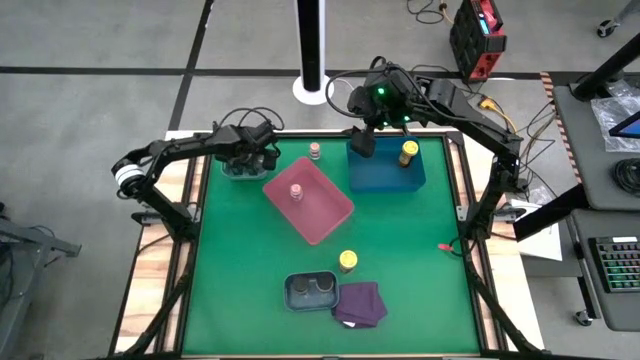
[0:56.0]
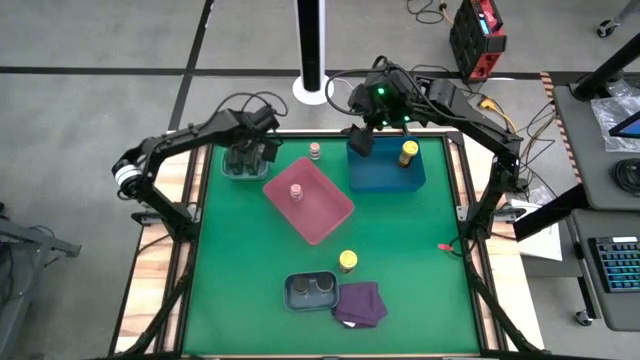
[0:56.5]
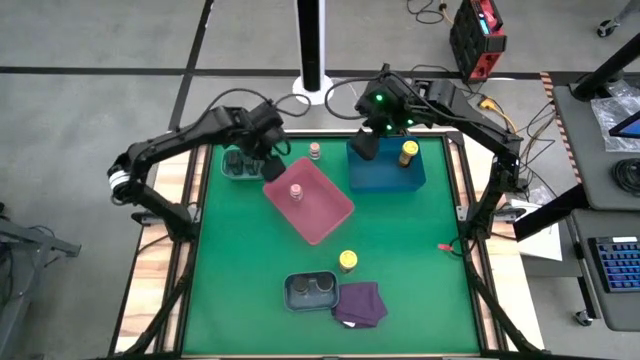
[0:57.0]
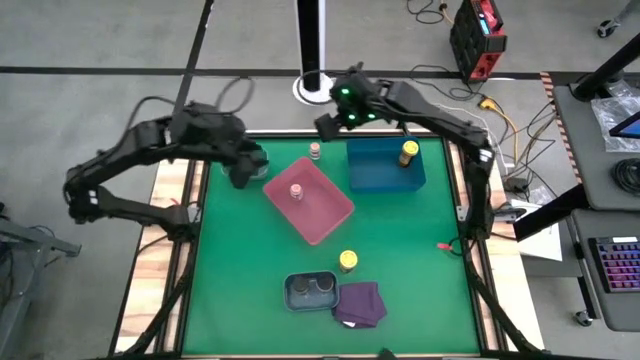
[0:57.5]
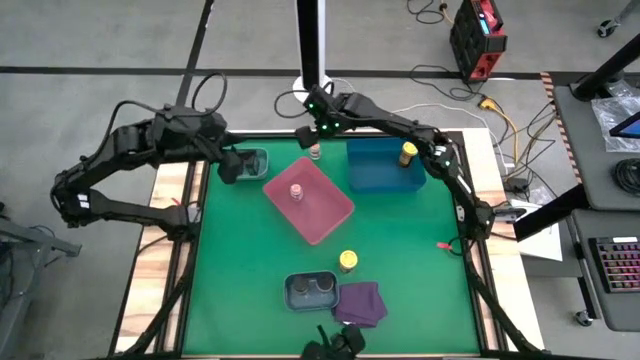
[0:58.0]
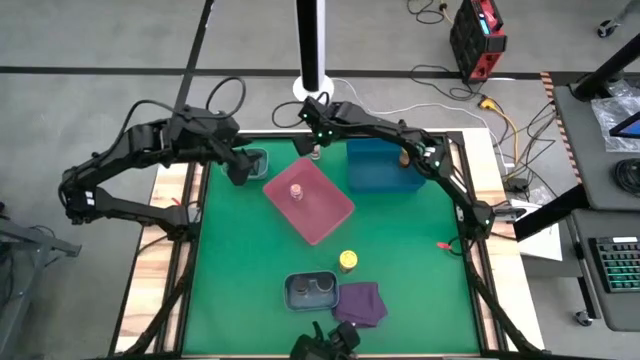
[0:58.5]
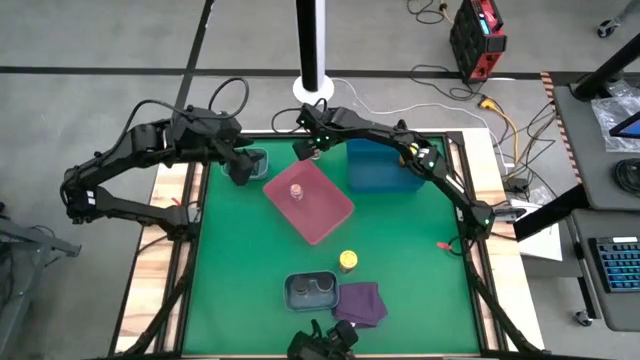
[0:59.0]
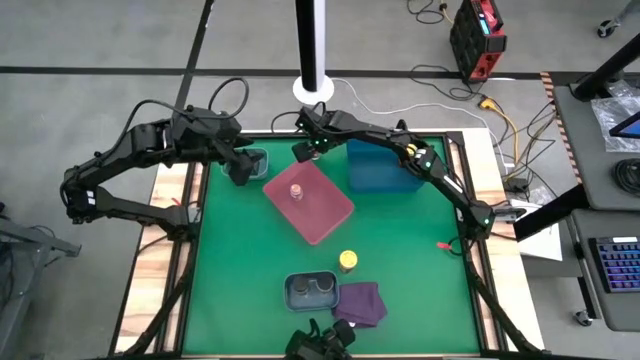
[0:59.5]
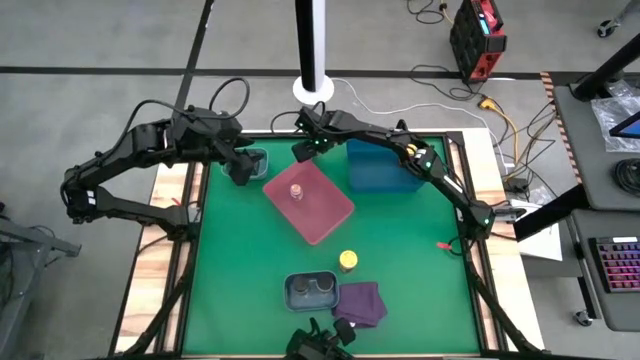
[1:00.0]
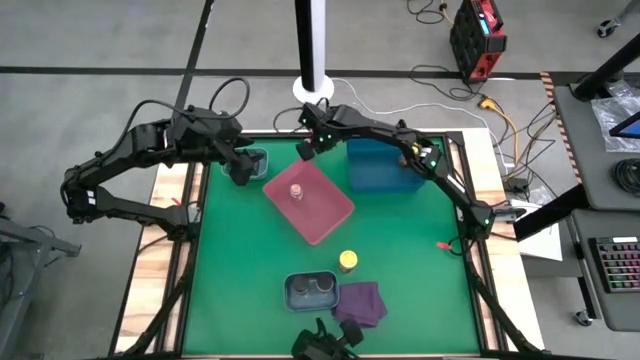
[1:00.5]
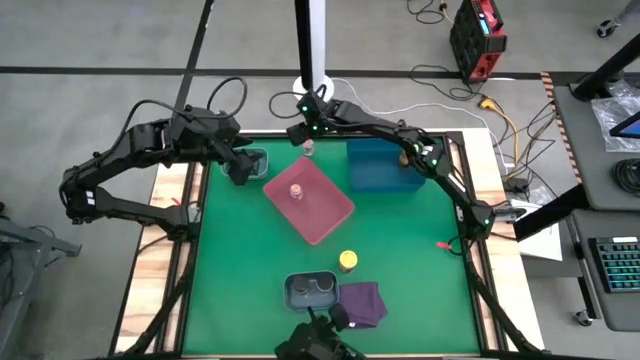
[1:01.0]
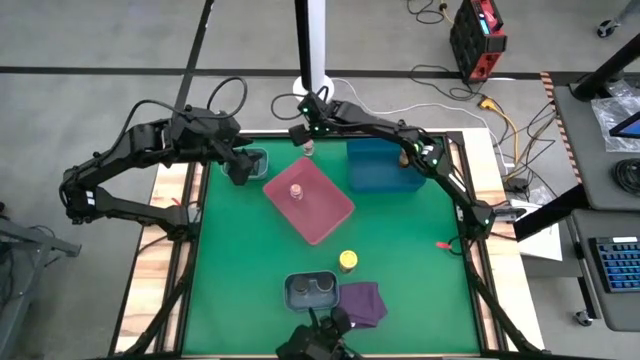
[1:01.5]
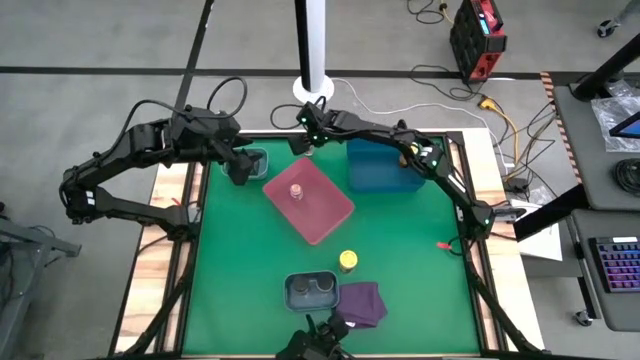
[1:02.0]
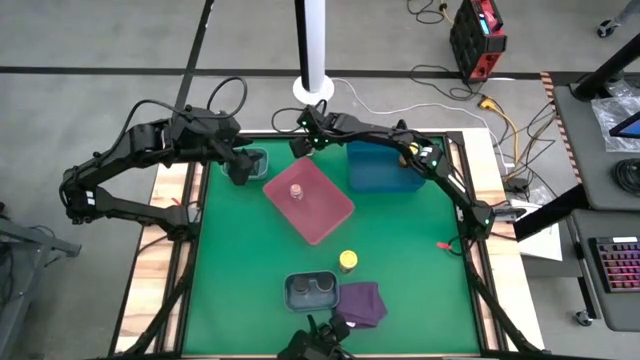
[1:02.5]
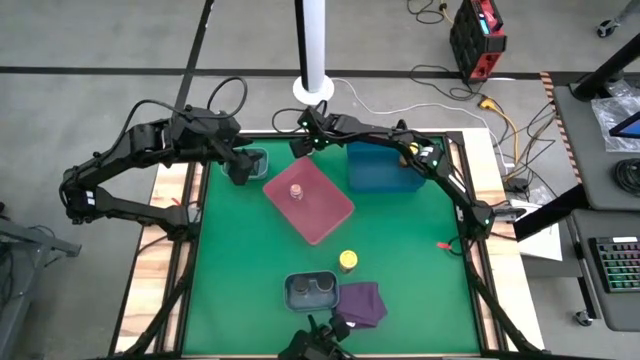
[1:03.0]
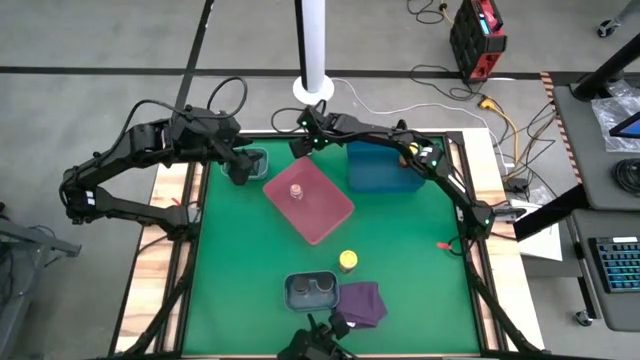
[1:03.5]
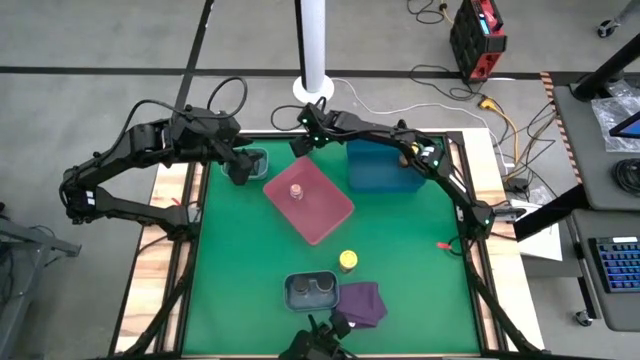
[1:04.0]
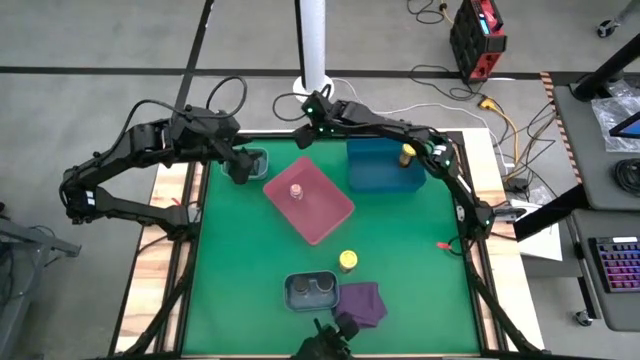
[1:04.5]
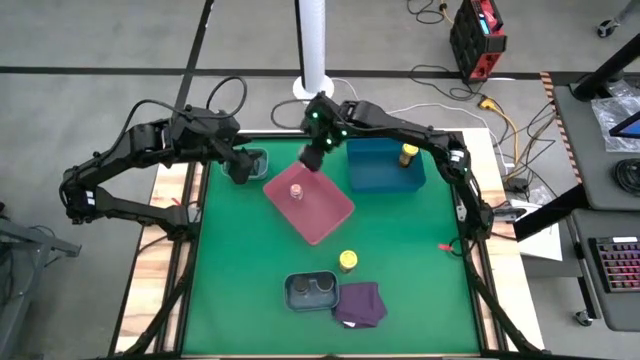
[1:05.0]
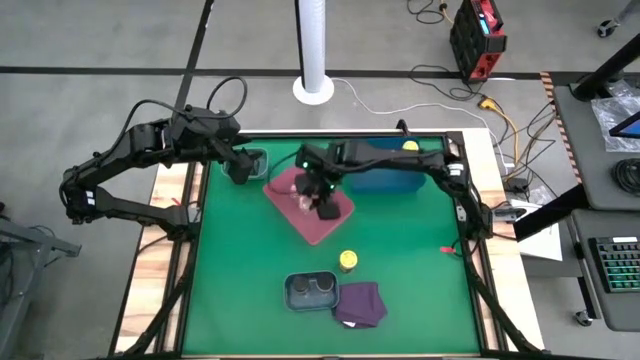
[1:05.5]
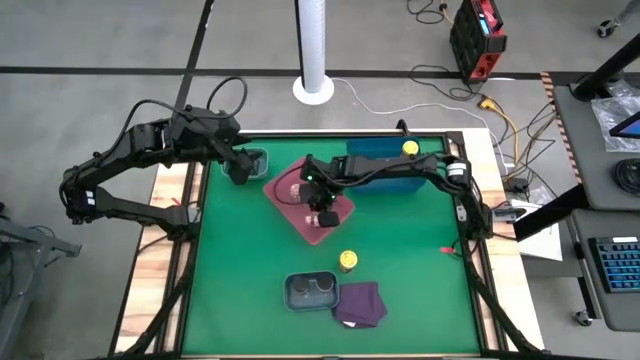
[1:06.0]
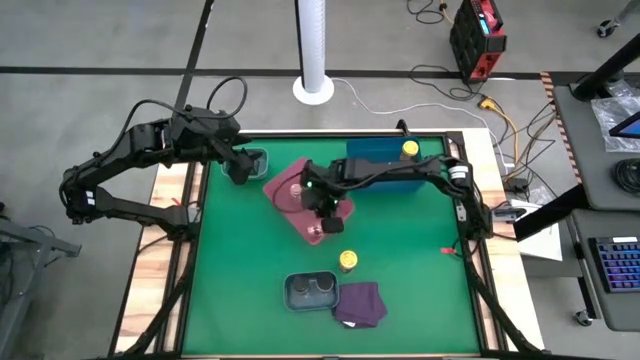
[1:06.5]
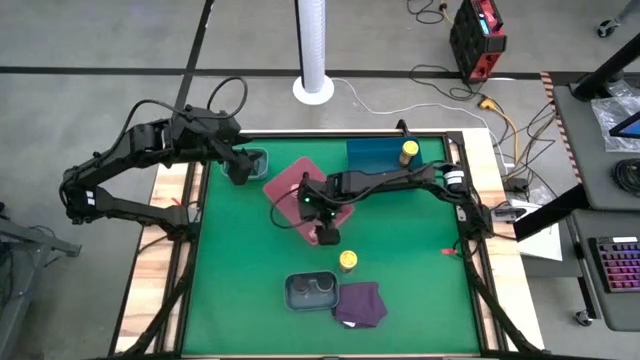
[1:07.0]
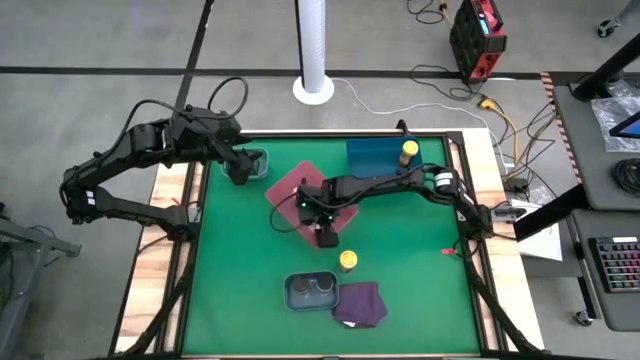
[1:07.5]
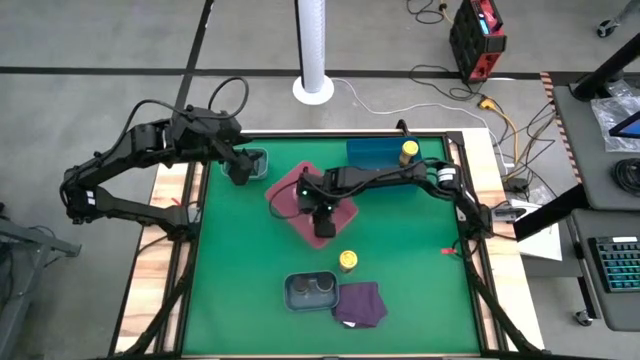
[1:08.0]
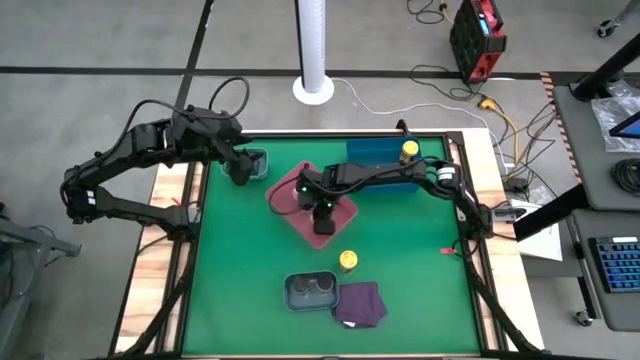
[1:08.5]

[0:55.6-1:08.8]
Task: Sort spices by type
Put the transparent seasoning bottle into the pink bin

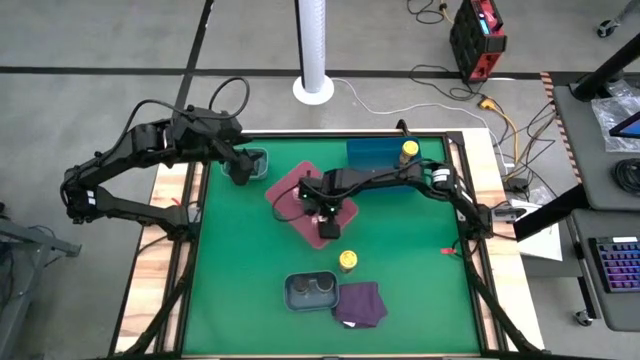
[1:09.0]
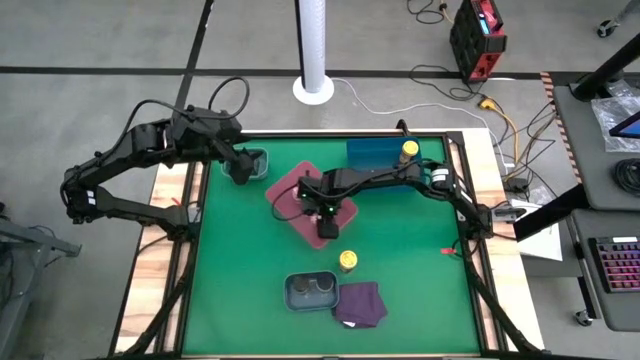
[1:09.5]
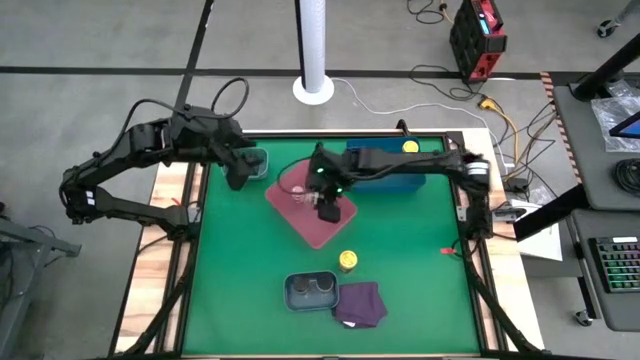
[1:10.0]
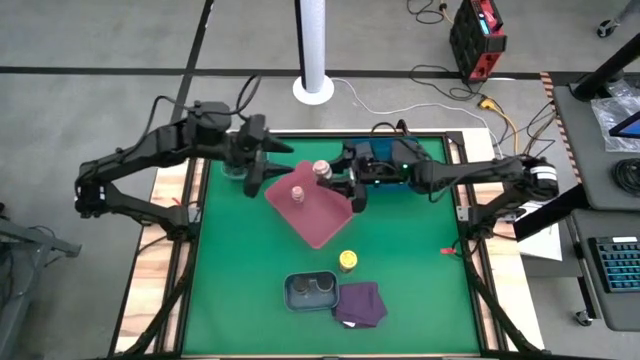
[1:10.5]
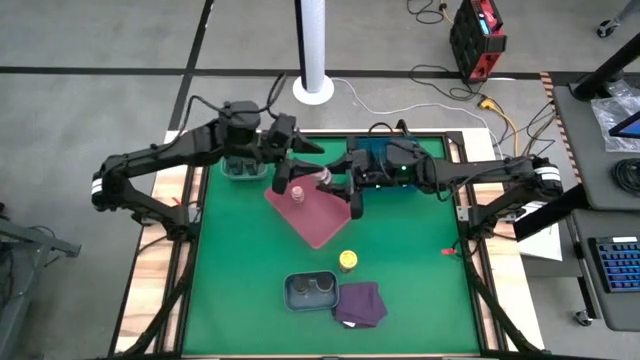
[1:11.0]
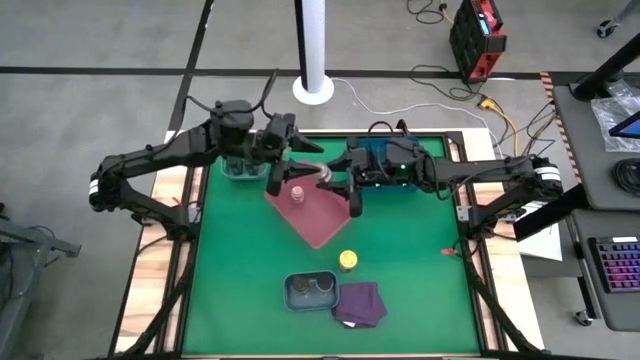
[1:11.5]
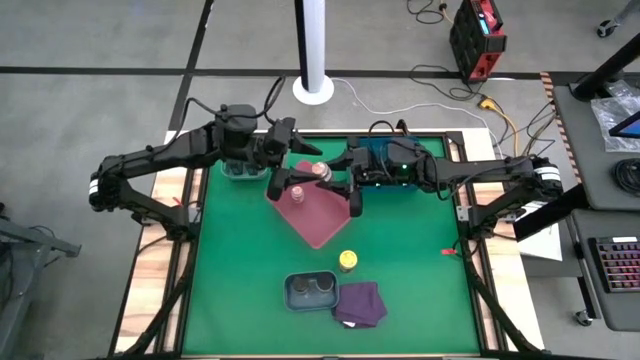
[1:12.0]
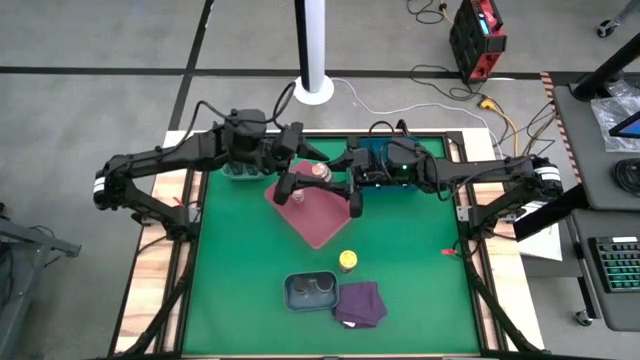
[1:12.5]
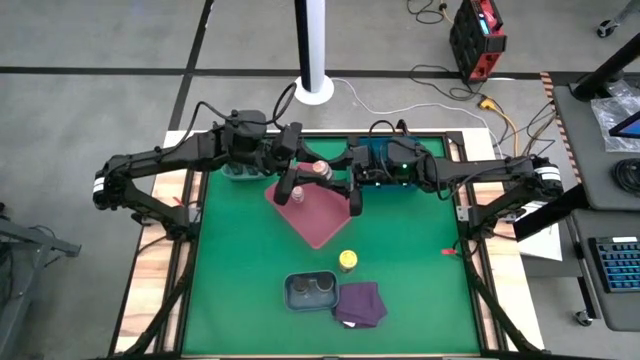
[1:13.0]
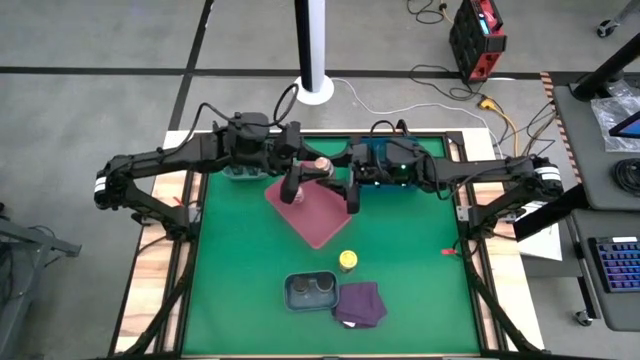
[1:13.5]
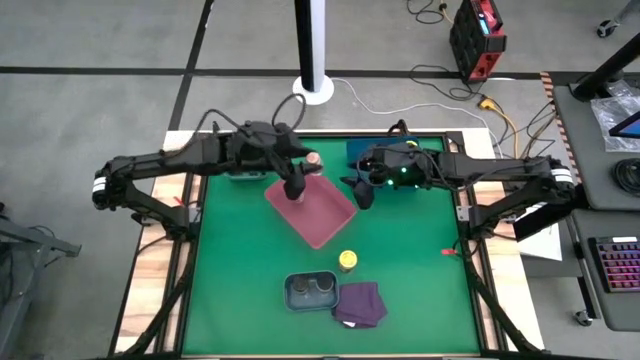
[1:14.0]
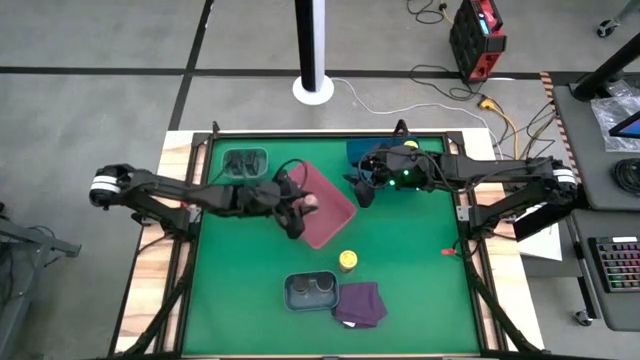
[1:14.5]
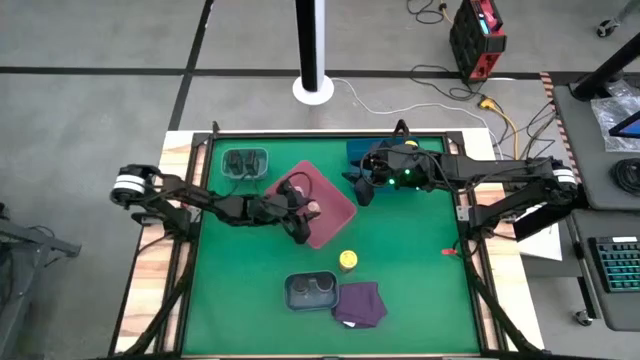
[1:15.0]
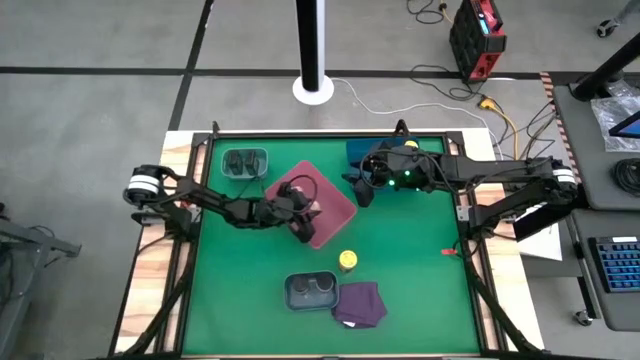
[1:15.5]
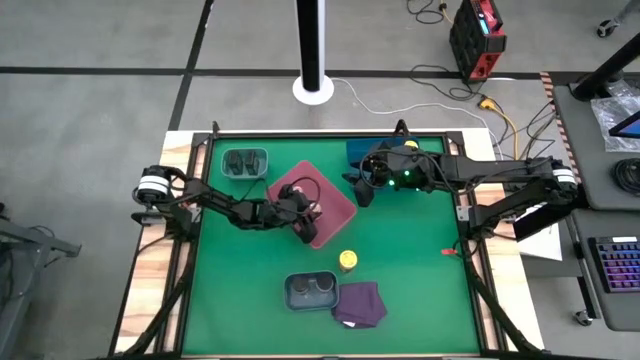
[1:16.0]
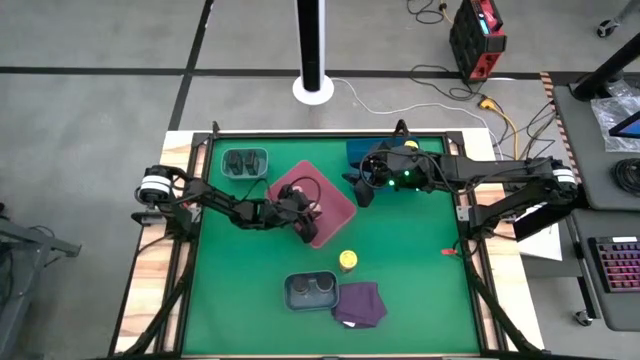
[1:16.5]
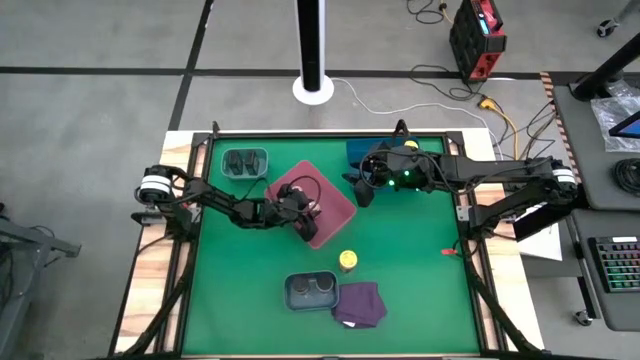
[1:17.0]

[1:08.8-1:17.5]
Put the transparent seasoning bottle into the pink bin
